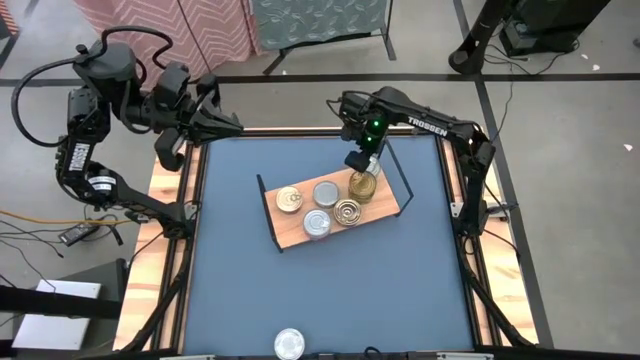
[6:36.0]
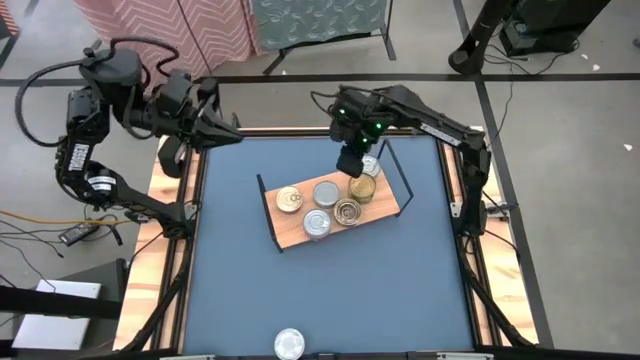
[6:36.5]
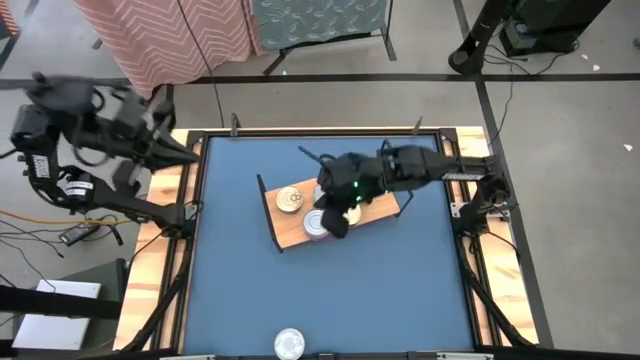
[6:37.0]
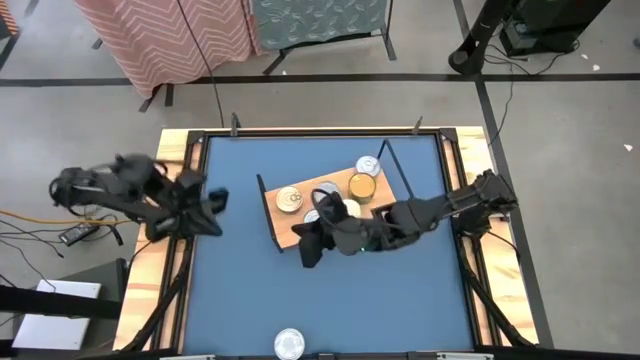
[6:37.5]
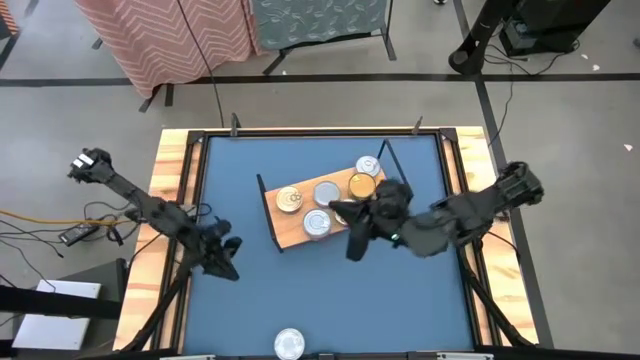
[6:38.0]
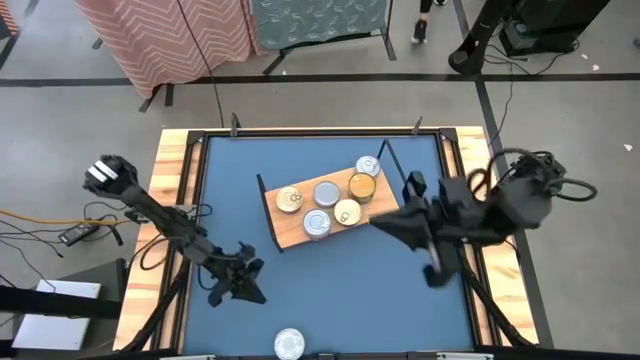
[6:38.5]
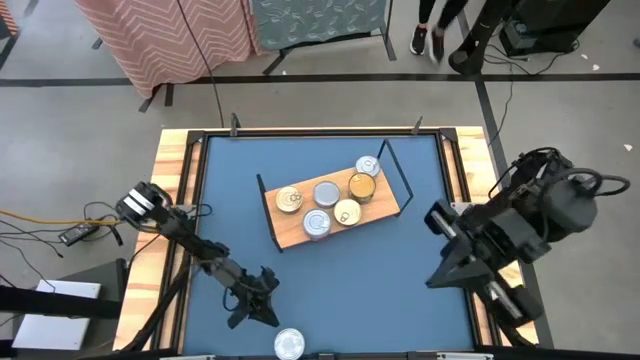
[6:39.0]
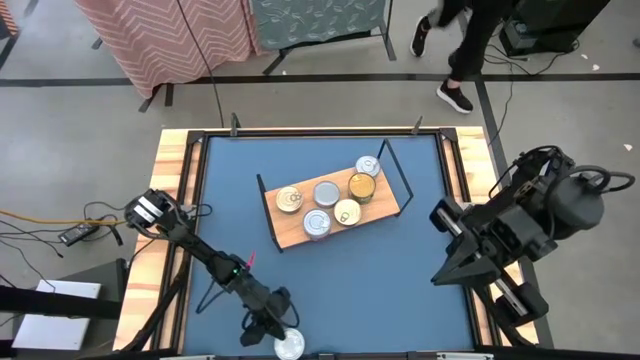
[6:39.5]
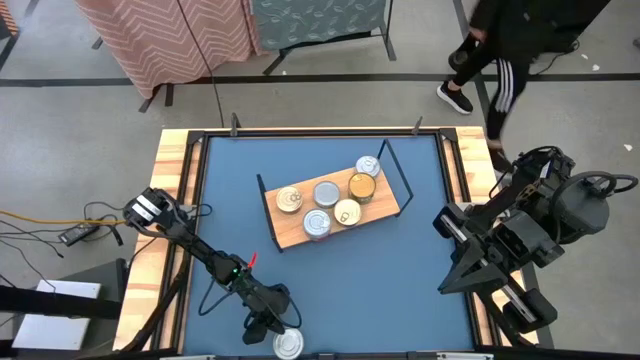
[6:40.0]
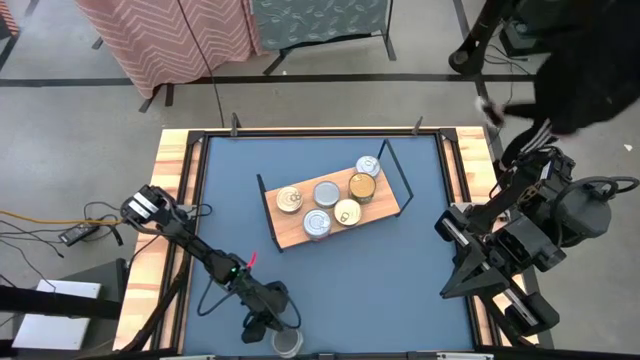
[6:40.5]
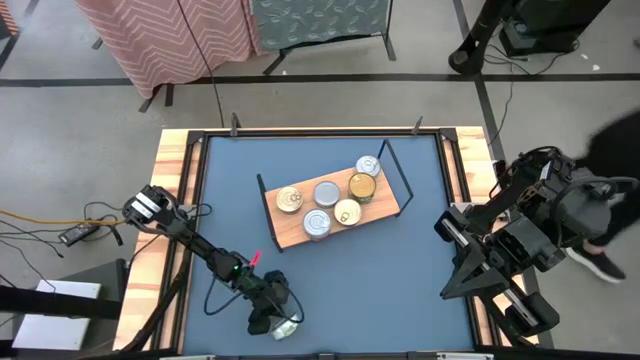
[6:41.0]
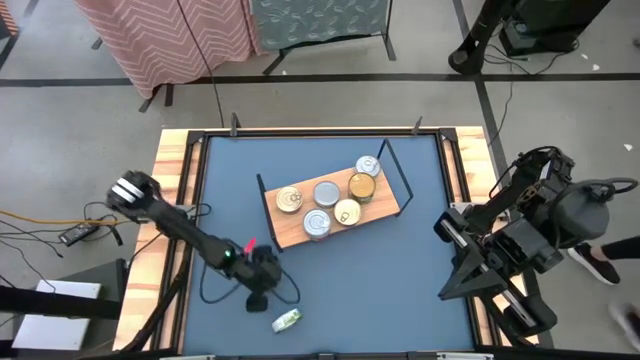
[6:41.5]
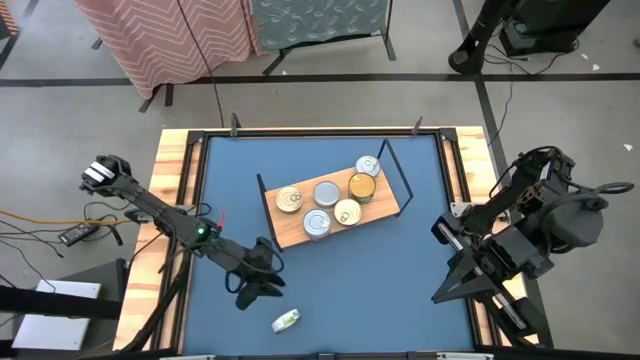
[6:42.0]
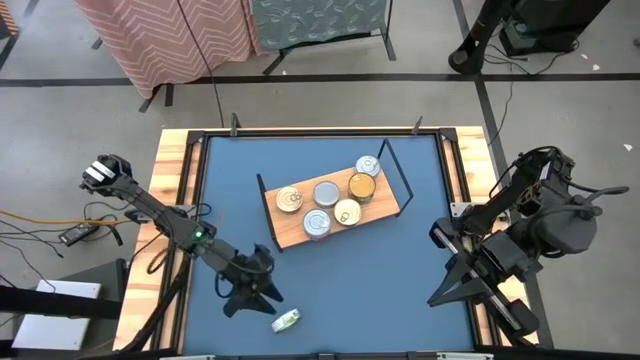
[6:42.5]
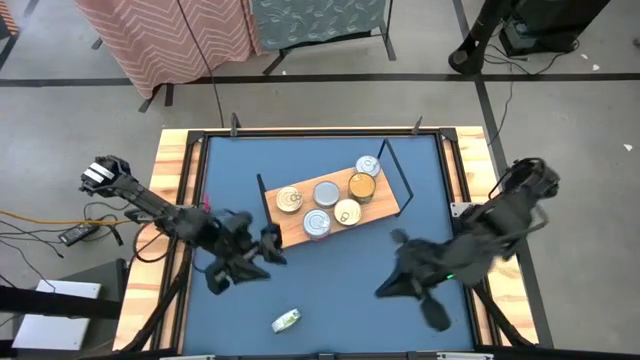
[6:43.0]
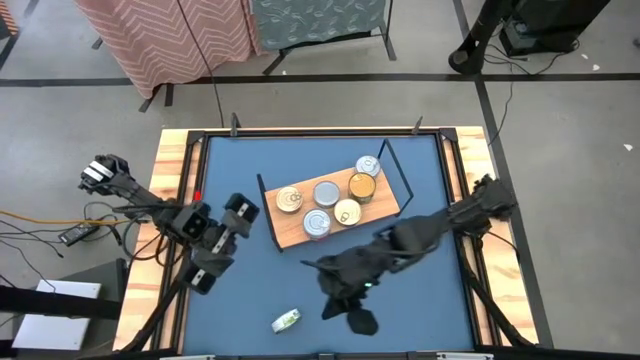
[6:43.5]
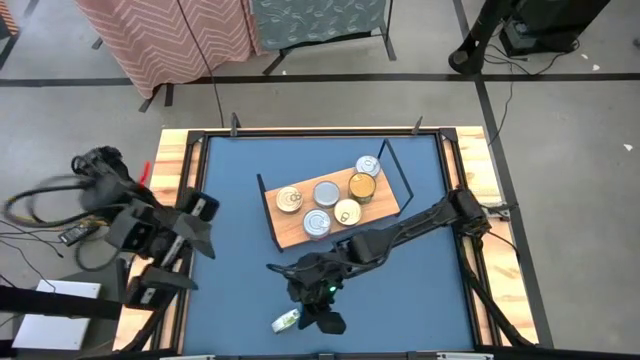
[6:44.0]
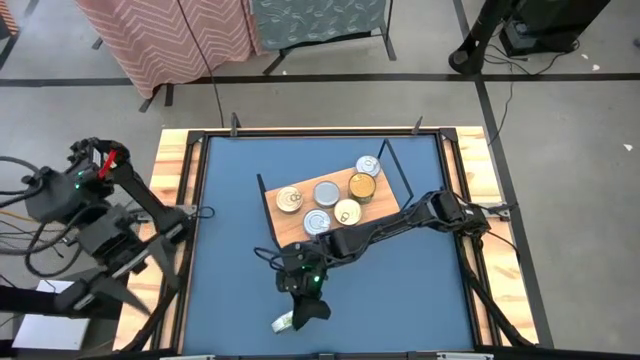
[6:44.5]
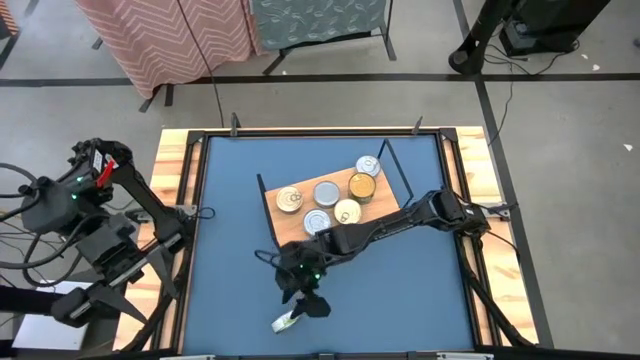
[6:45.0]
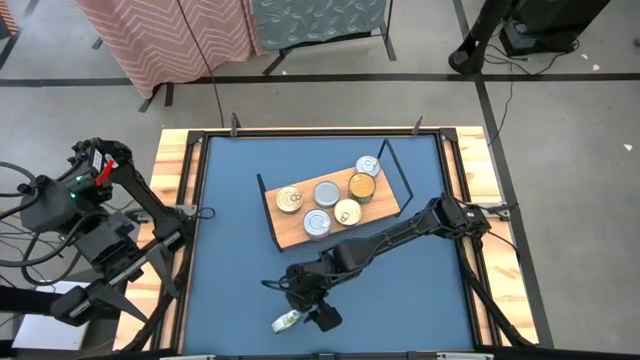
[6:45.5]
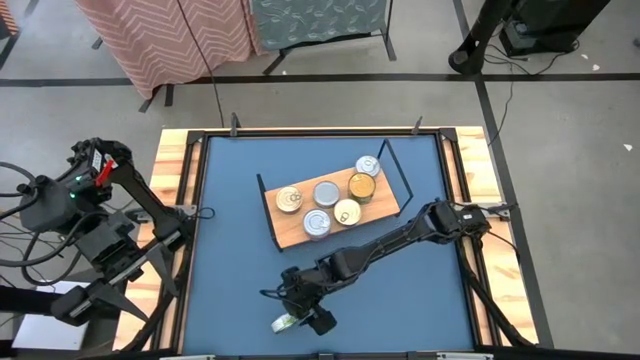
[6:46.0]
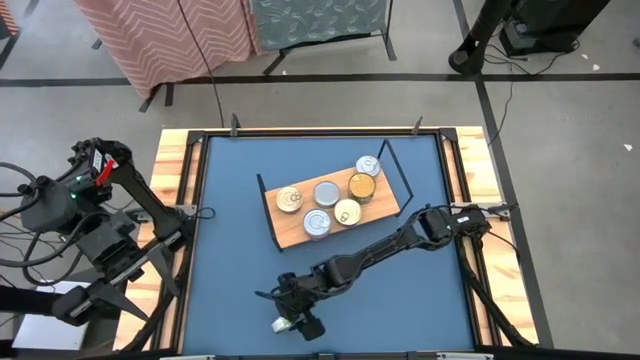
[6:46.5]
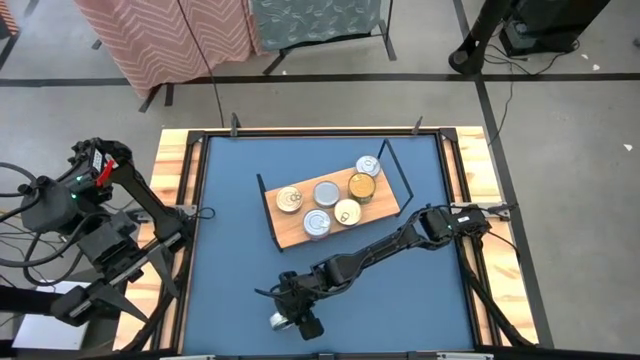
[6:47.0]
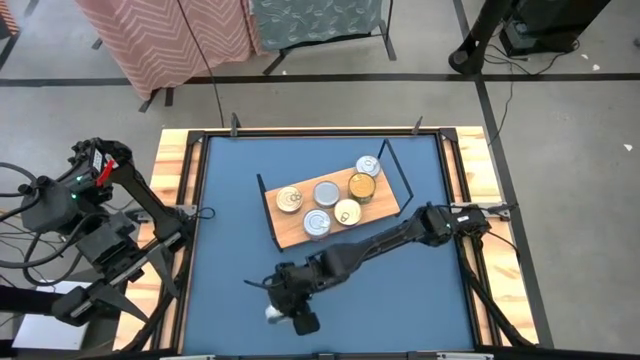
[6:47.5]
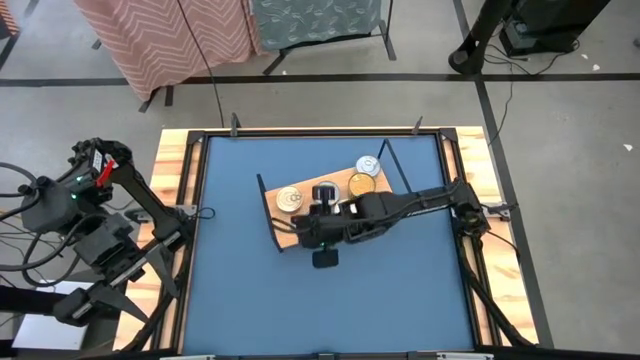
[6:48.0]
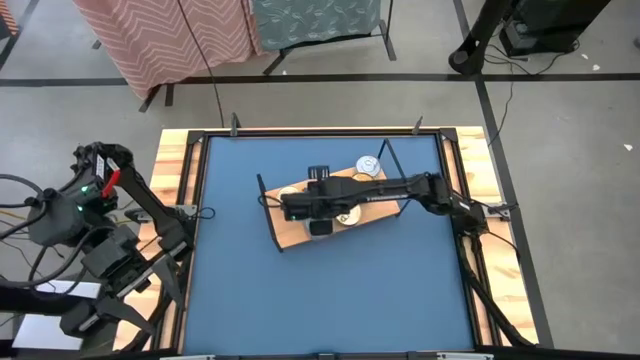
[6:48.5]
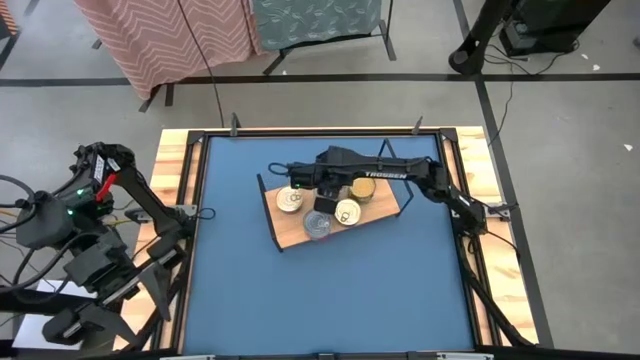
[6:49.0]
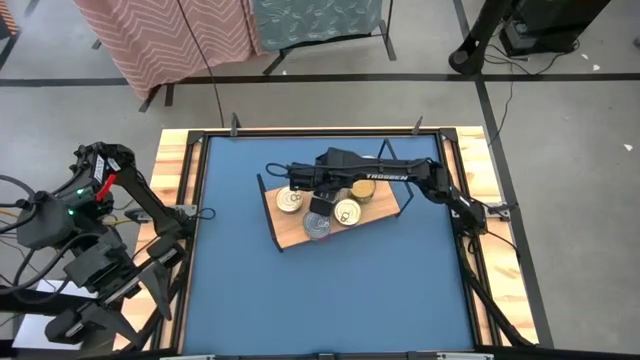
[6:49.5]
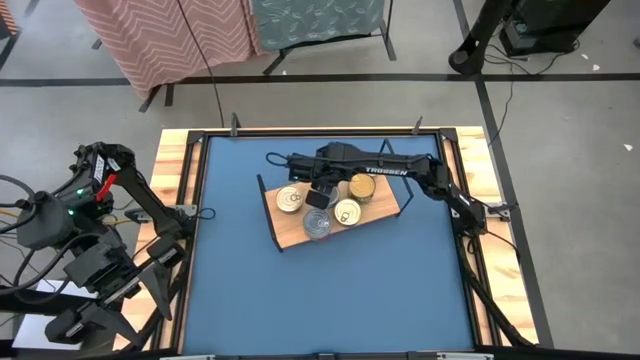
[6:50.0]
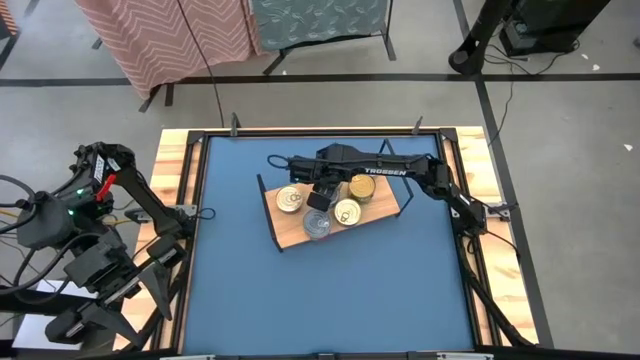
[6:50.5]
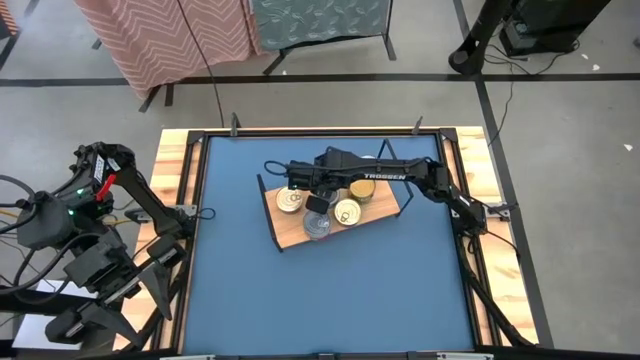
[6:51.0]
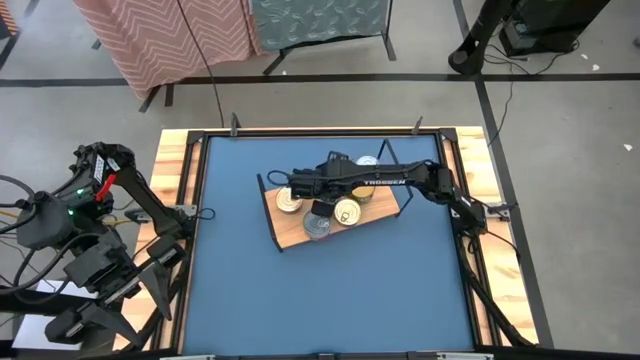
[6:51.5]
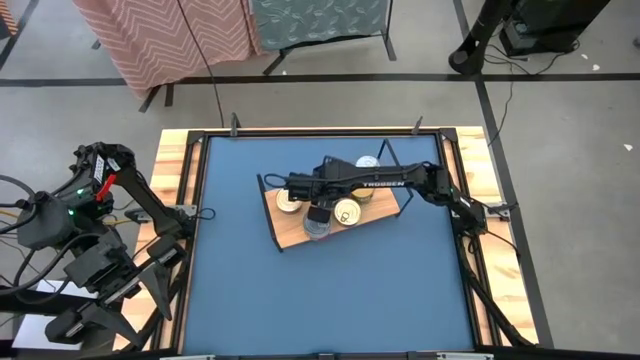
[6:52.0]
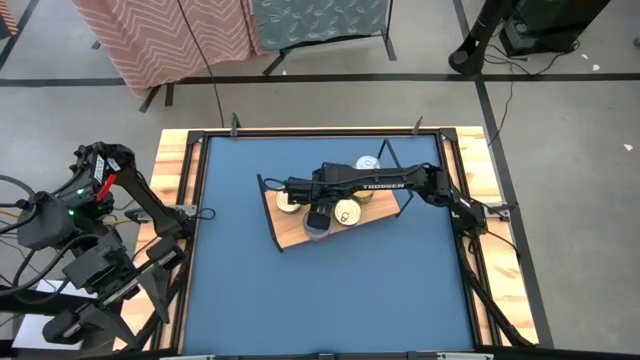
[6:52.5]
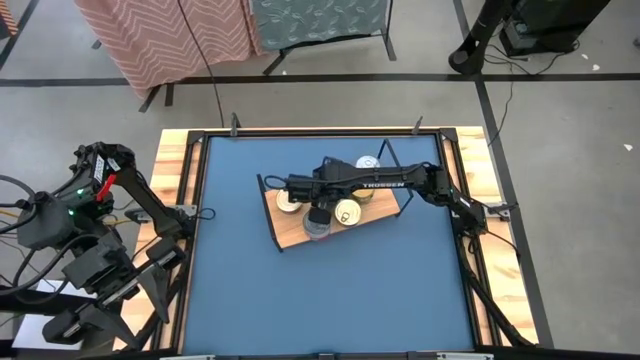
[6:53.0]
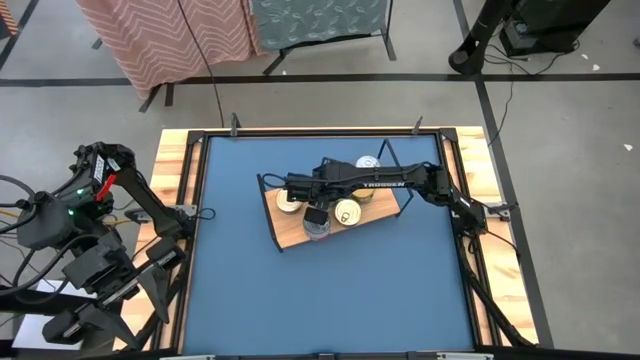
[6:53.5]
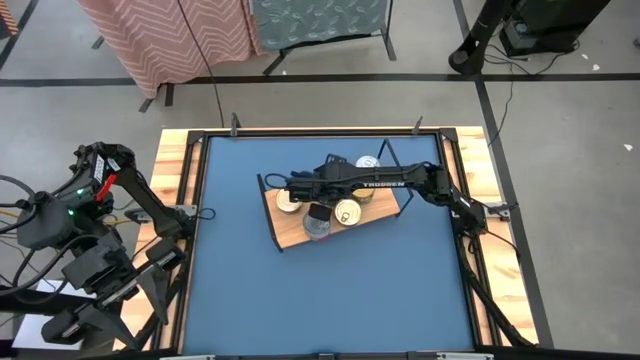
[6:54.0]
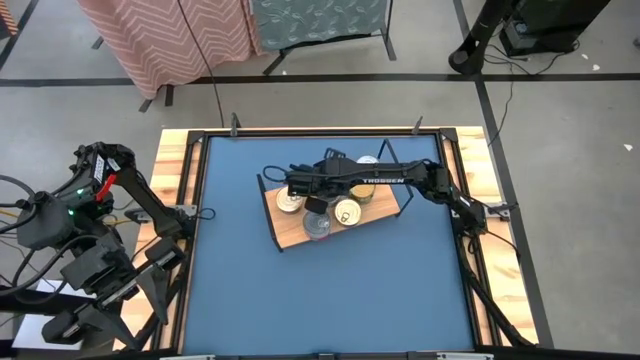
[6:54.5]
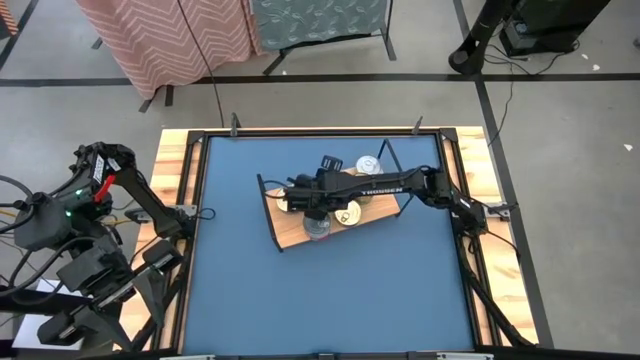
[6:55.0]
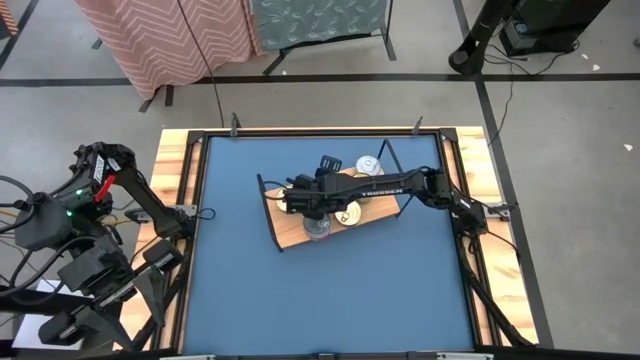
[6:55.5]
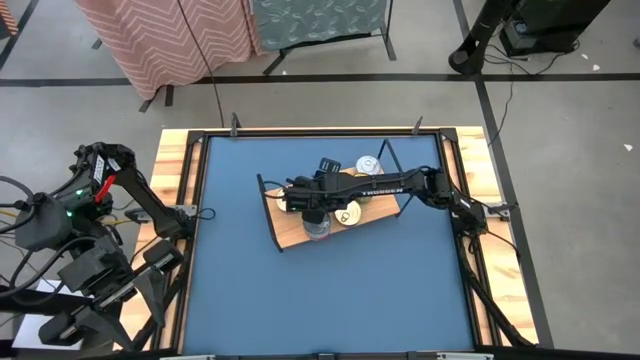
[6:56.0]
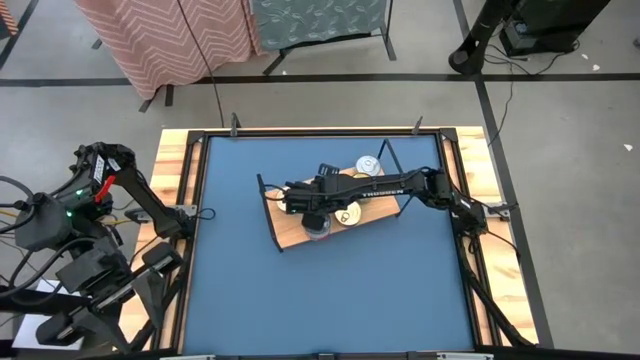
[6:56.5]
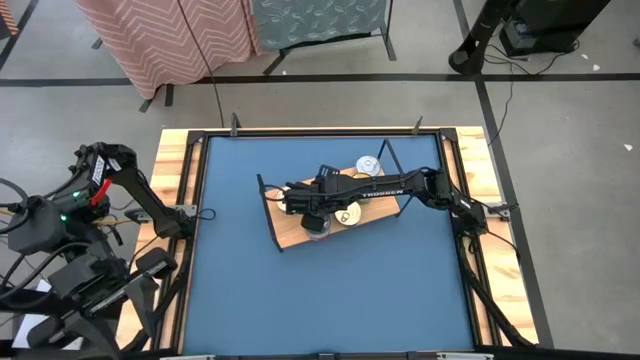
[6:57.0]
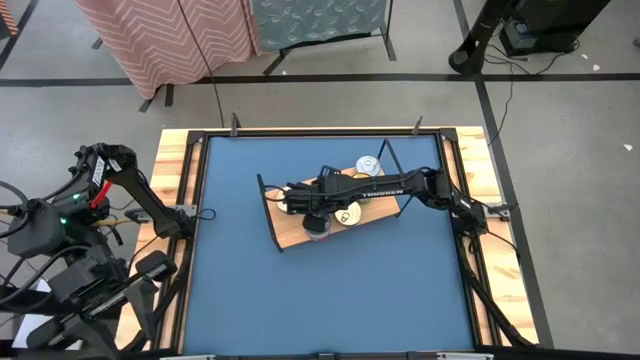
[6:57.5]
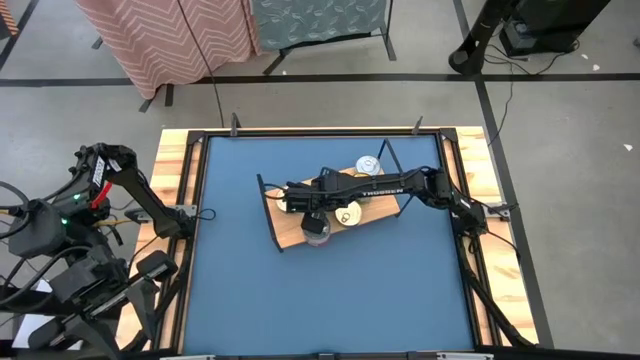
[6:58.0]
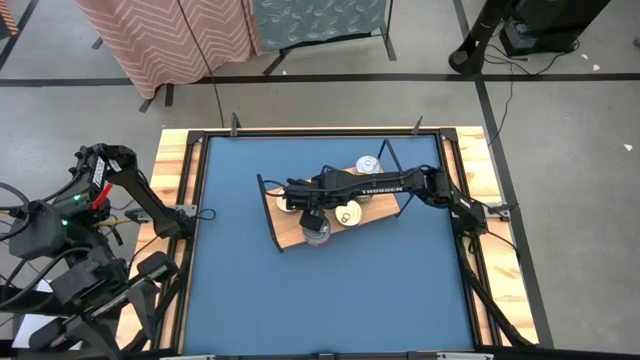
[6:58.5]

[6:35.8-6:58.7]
Task: Stack canned seafood by type on shelf
Stack the green tuna can on top of the green tuna can on the shelf
